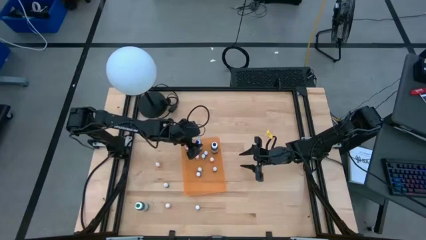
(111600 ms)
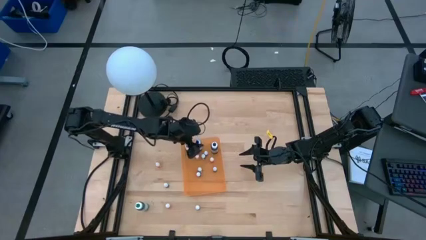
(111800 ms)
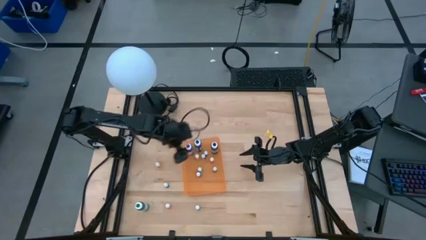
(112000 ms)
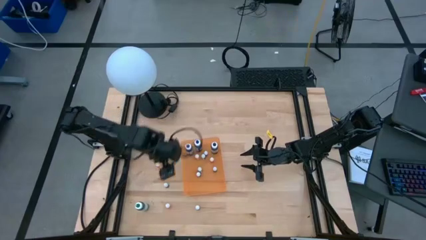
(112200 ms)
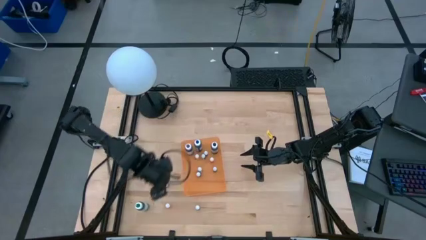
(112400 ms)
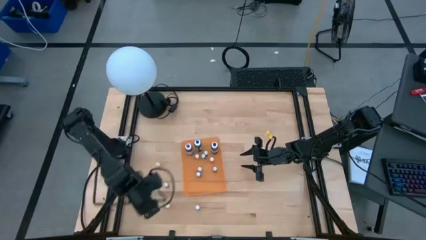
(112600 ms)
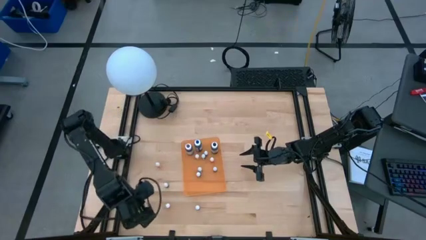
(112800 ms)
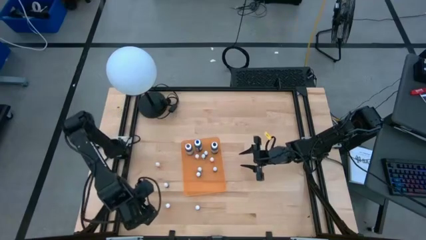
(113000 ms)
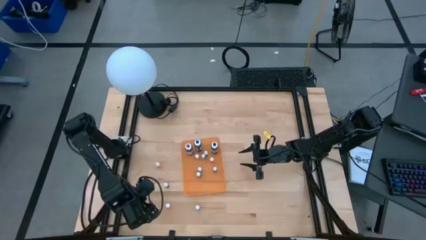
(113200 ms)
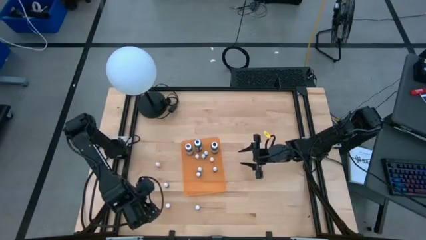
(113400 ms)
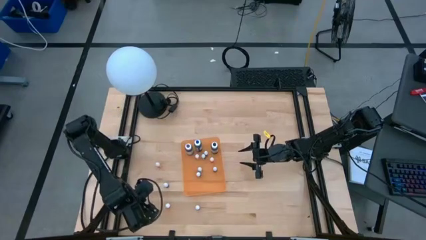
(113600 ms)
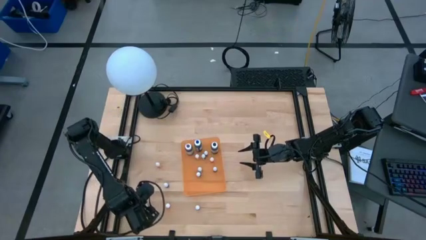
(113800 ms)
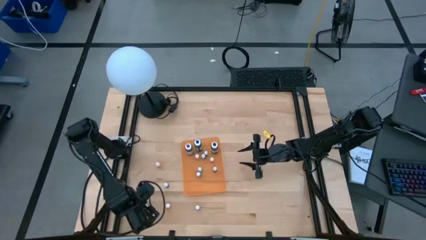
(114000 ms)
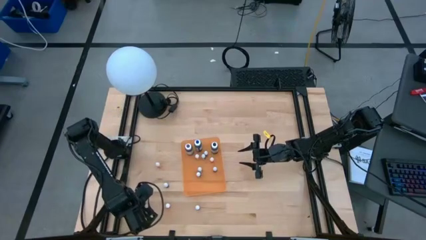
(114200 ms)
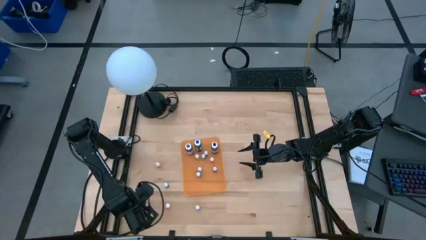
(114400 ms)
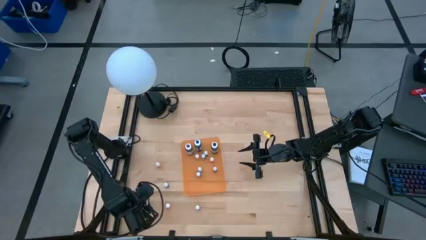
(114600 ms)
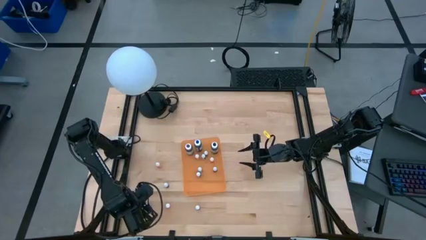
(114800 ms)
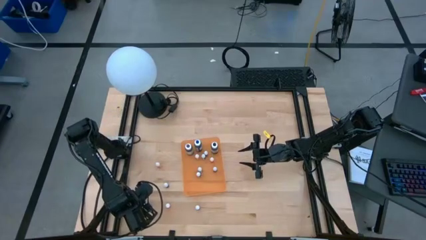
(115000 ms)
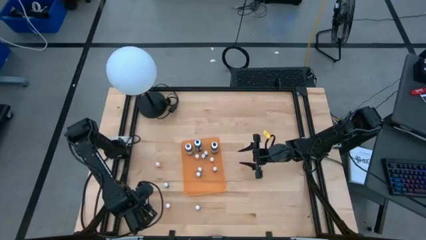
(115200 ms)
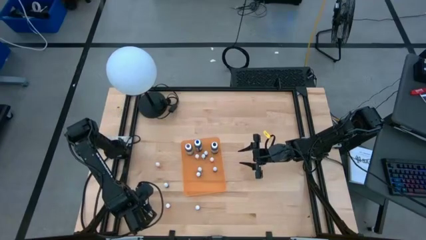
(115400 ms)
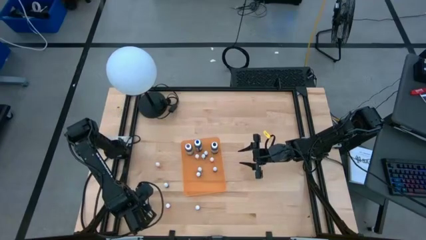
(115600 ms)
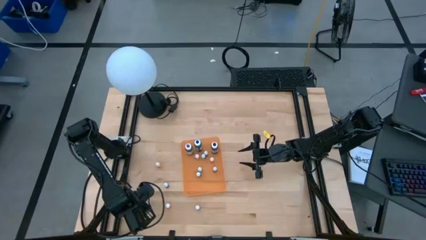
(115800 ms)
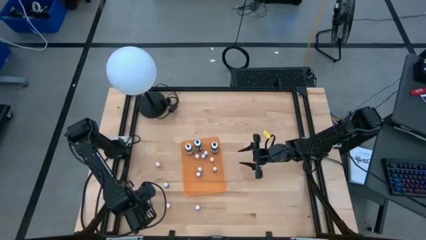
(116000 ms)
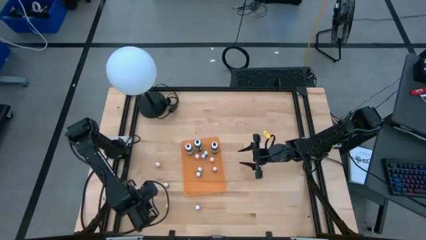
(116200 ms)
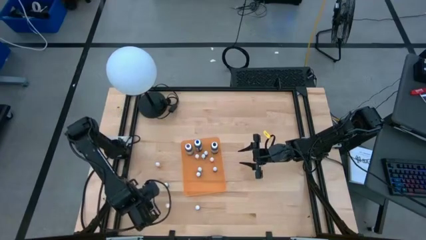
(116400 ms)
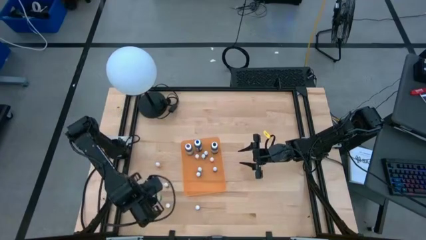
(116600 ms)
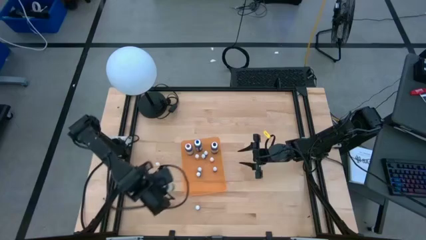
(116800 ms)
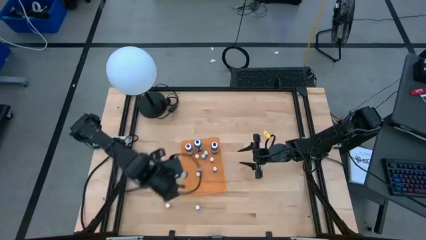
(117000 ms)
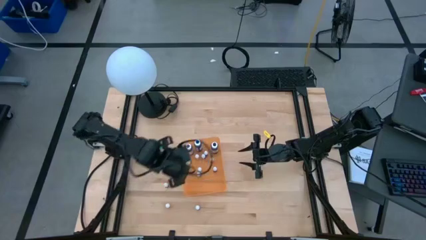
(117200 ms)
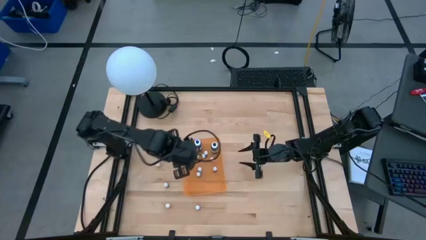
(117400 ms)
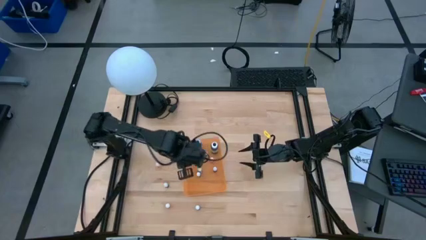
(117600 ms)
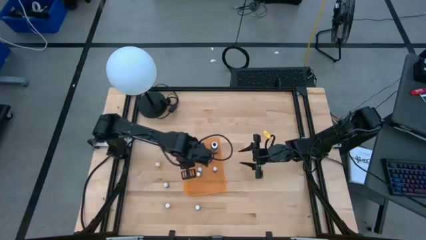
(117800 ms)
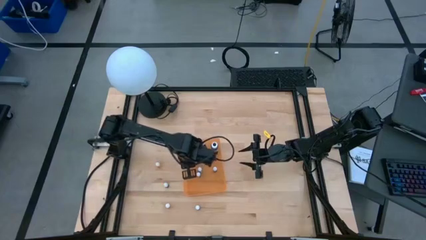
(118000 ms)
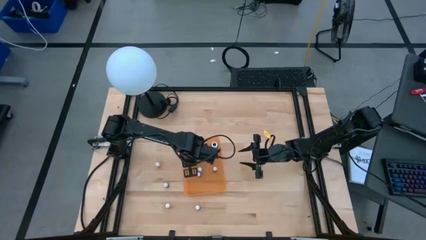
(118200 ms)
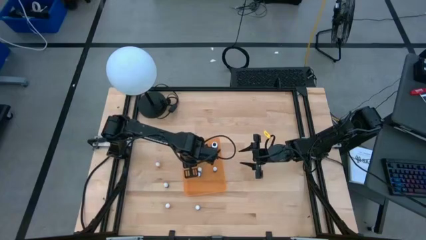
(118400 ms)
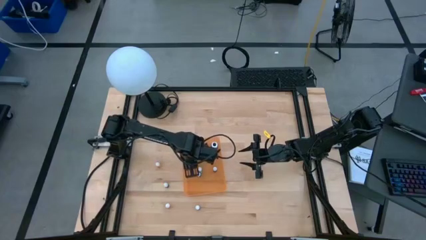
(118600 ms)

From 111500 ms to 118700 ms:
Task: Pick & Place food coloring
Put the large green food coloring bottle into the orange bin

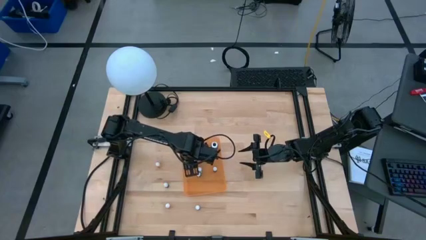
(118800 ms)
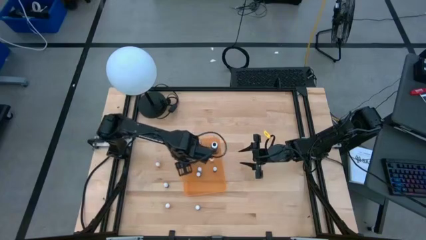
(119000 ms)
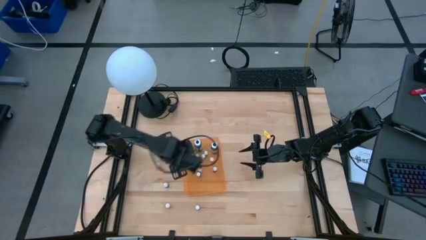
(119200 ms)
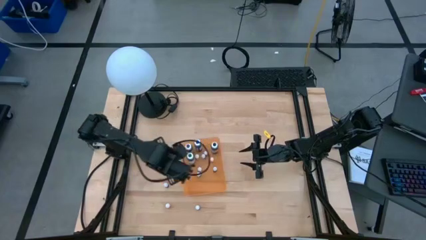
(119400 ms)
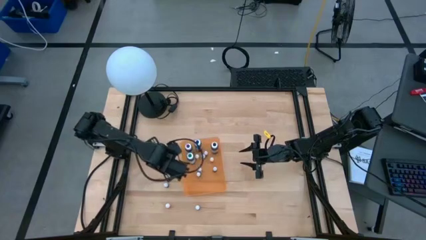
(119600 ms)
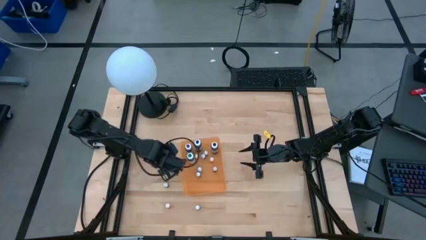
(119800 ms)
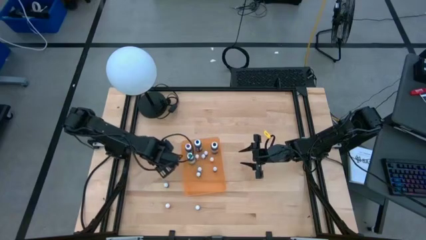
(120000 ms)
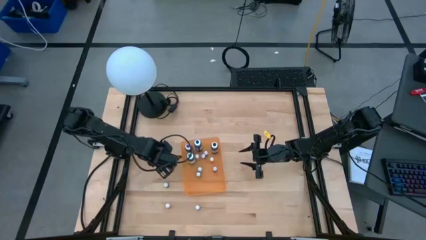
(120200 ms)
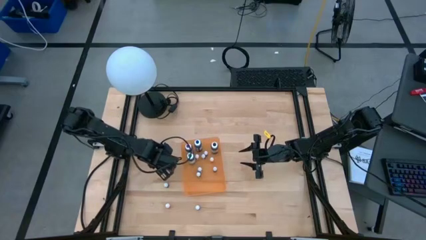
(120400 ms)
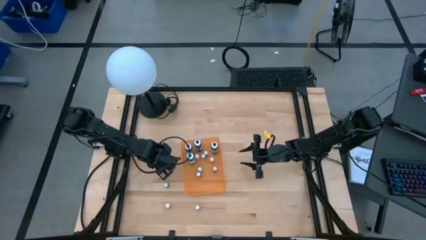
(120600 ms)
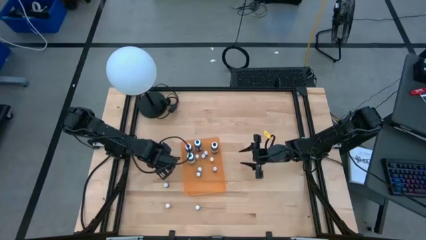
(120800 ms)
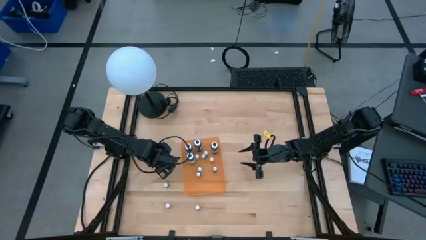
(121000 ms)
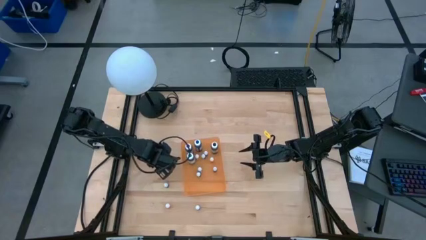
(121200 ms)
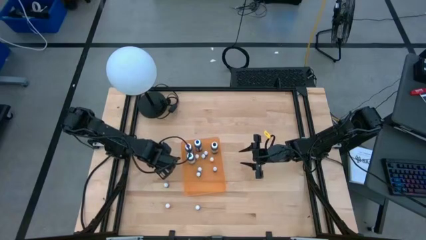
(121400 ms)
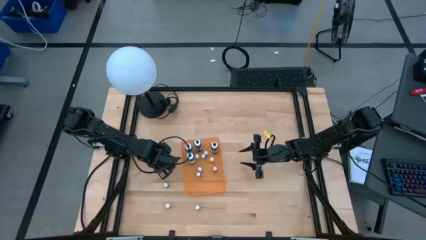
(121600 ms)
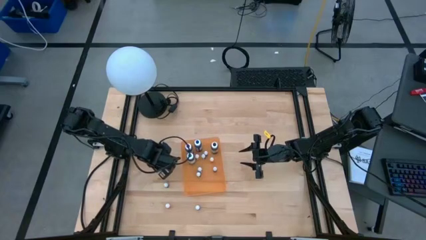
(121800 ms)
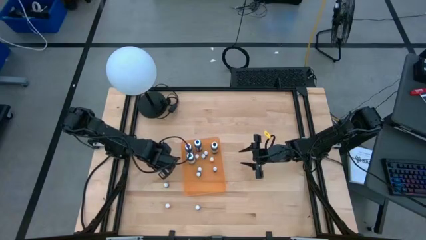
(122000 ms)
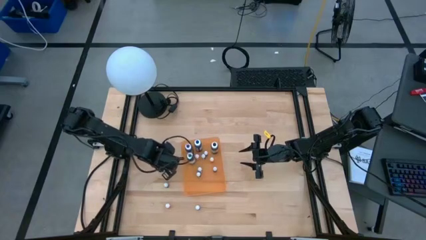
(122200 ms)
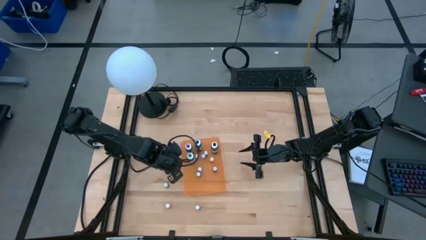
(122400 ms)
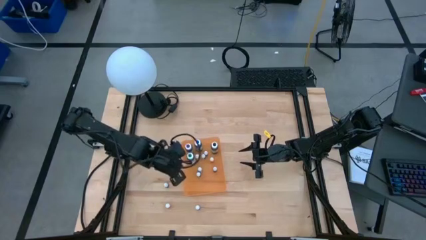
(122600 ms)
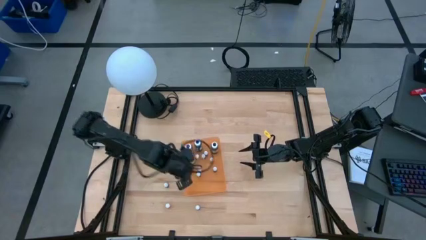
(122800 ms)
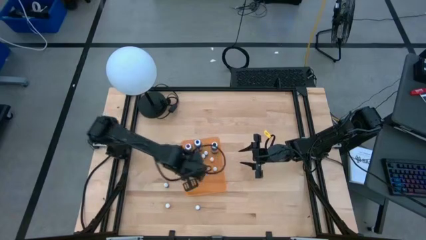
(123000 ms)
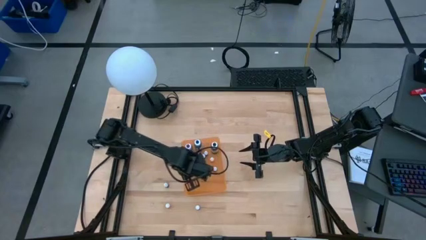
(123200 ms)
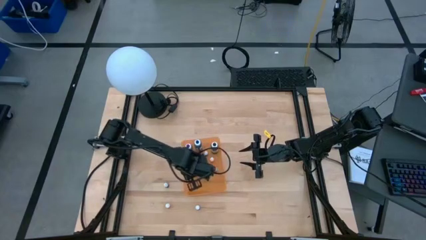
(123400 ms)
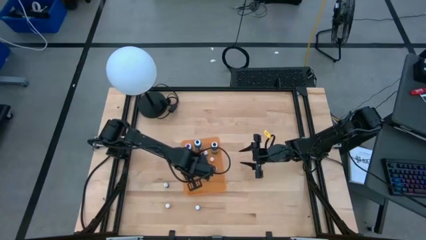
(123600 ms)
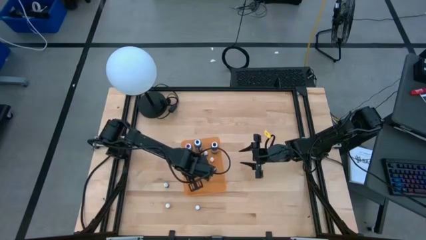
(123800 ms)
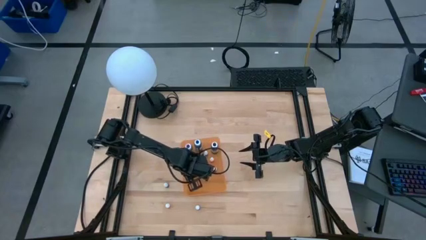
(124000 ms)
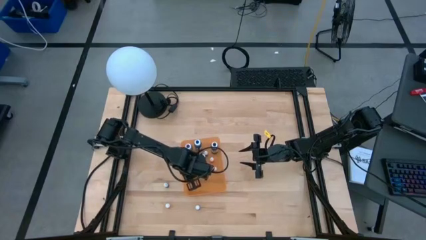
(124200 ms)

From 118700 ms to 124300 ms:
Put the small orange food coloring bottle into the orange bin

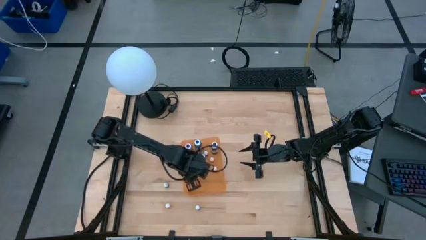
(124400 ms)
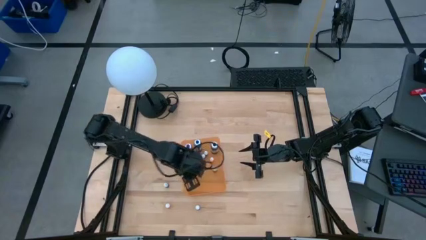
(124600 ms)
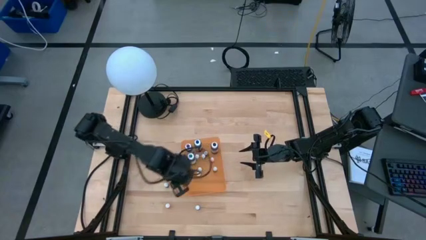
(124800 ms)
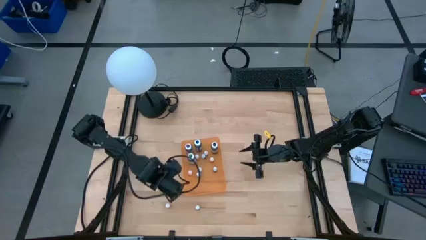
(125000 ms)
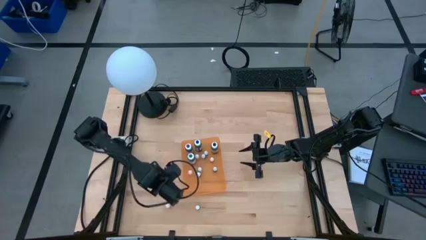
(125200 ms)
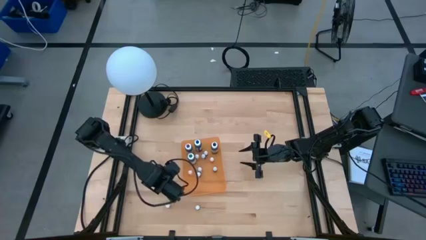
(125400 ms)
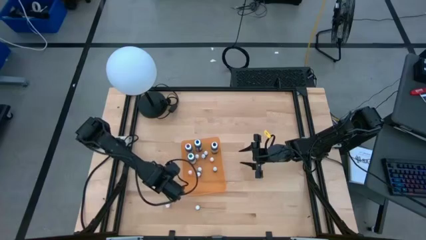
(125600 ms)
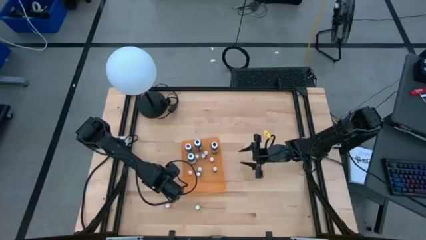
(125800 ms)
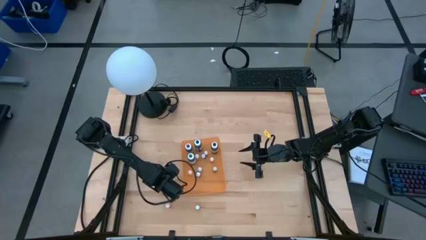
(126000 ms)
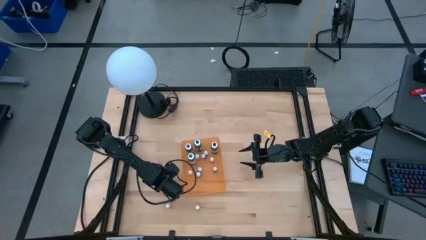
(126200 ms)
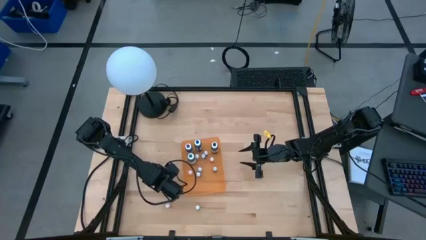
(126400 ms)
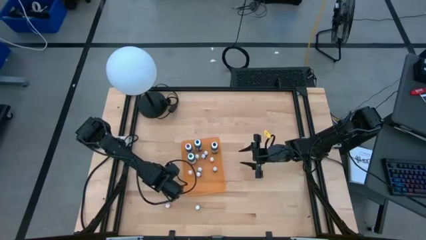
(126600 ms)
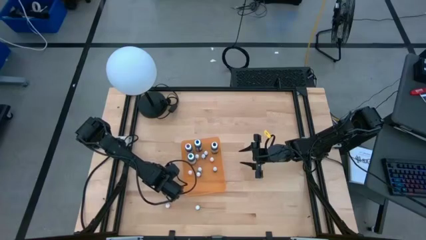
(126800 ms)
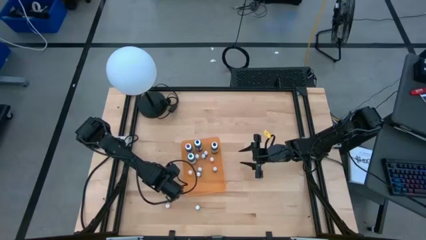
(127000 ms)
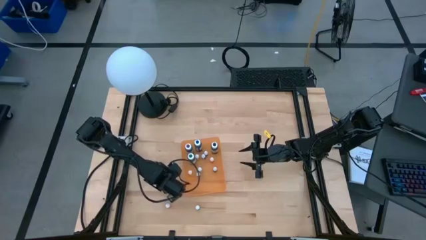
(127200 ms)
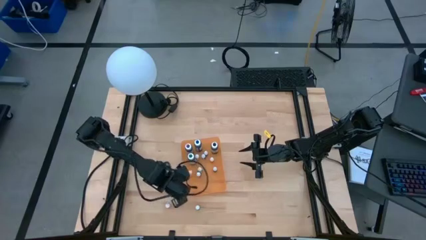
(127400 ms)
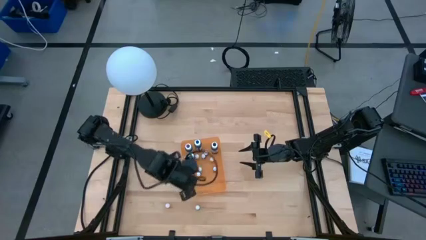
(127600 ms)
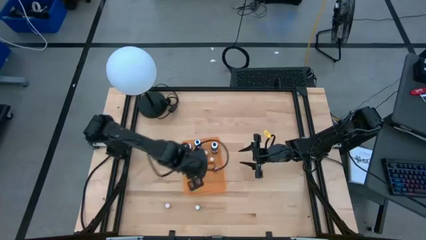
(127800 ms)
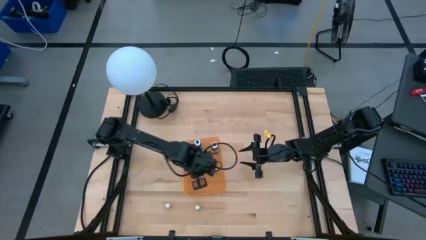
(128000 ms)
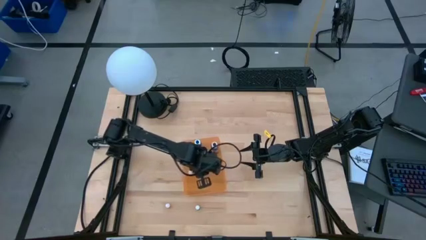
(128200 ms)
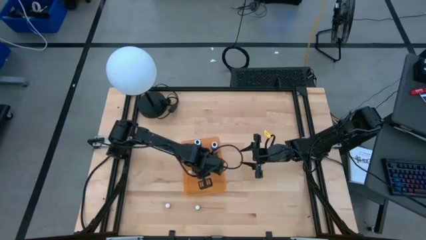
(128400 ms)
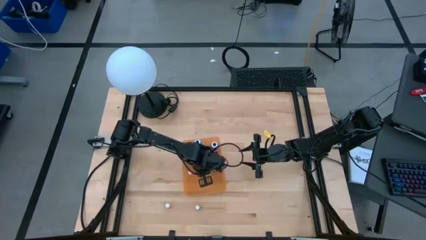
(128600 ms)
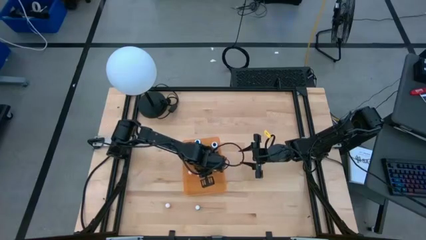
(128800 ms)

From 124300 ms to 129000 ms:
Put the small dark purple food coloring bottle into the orange bin
